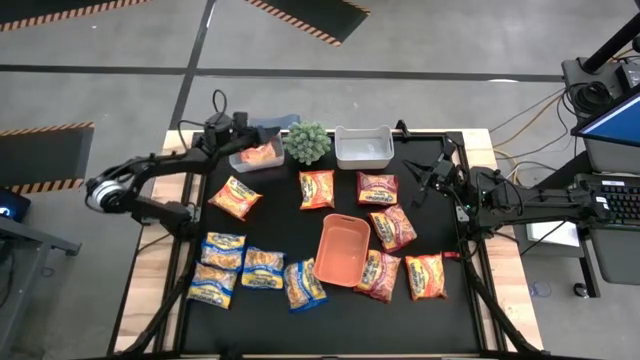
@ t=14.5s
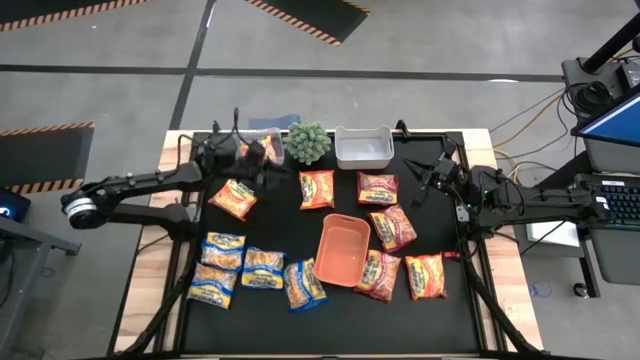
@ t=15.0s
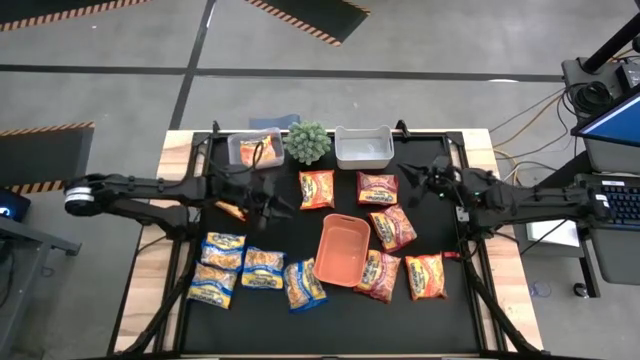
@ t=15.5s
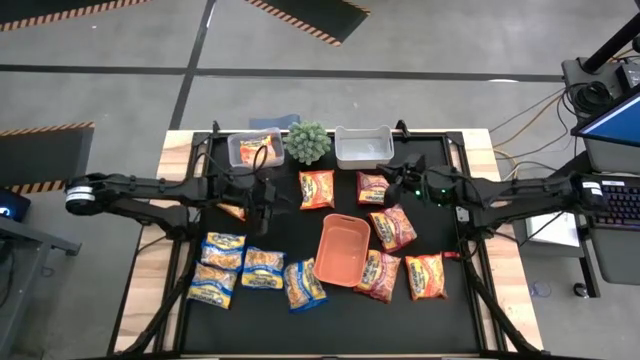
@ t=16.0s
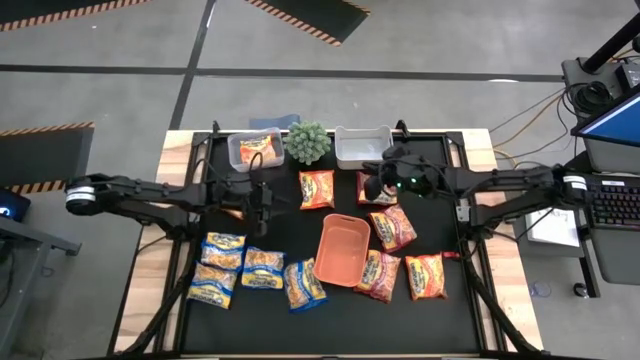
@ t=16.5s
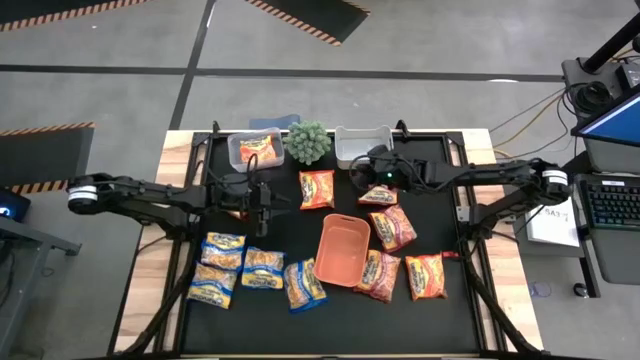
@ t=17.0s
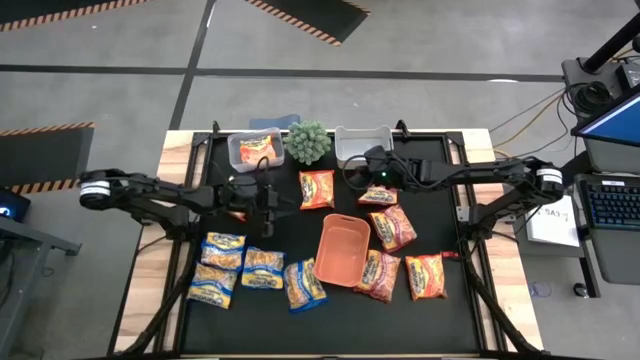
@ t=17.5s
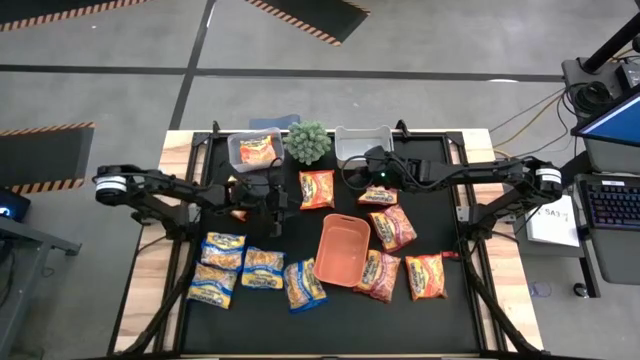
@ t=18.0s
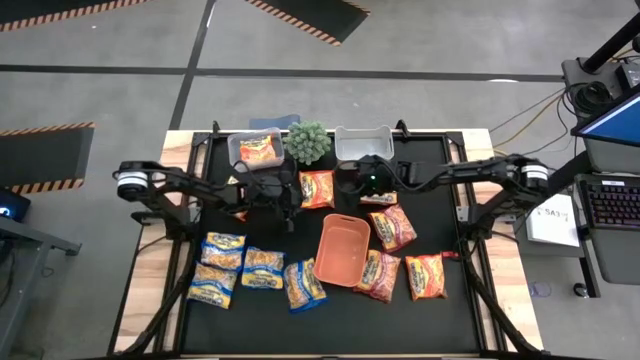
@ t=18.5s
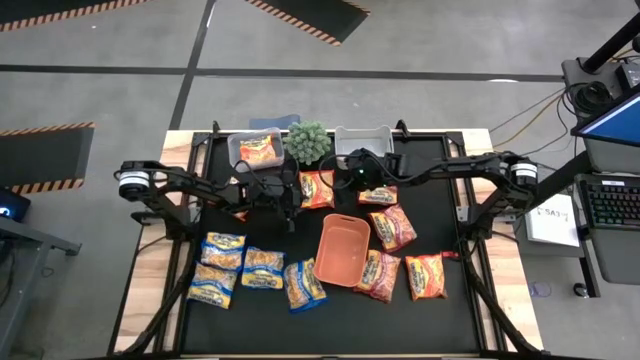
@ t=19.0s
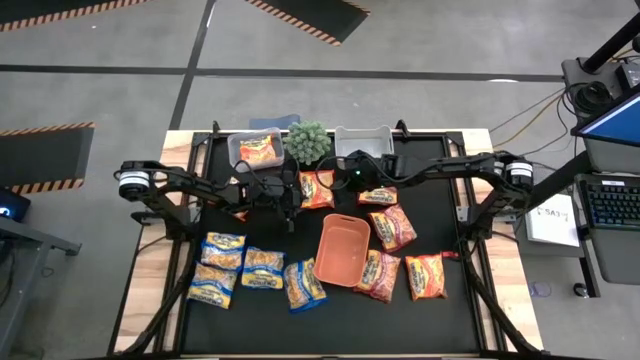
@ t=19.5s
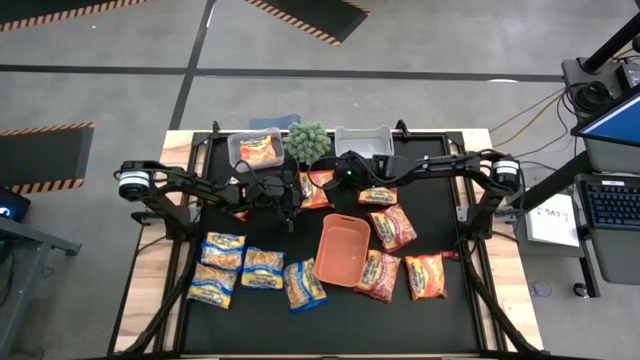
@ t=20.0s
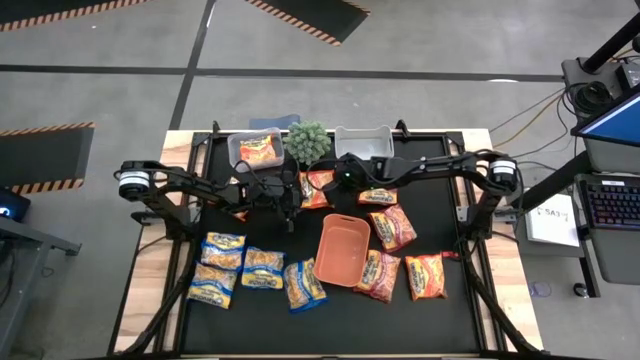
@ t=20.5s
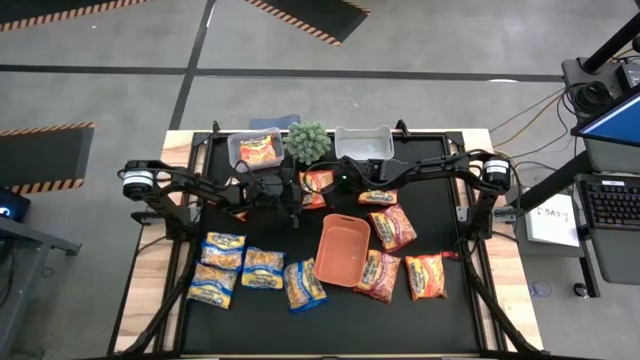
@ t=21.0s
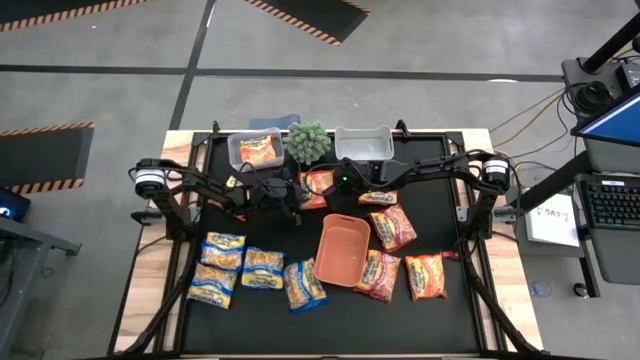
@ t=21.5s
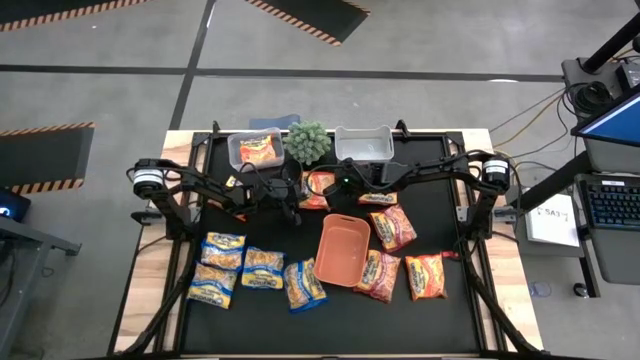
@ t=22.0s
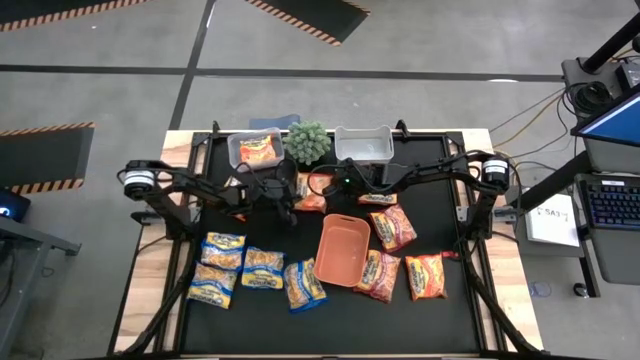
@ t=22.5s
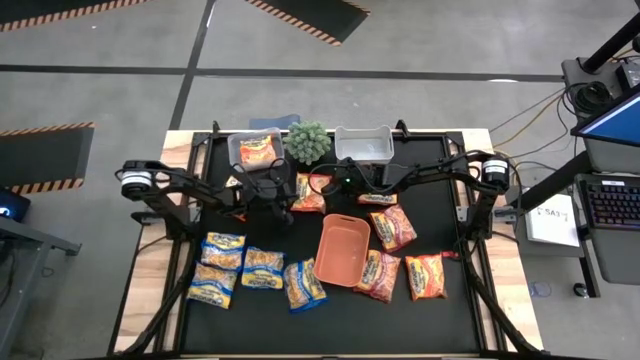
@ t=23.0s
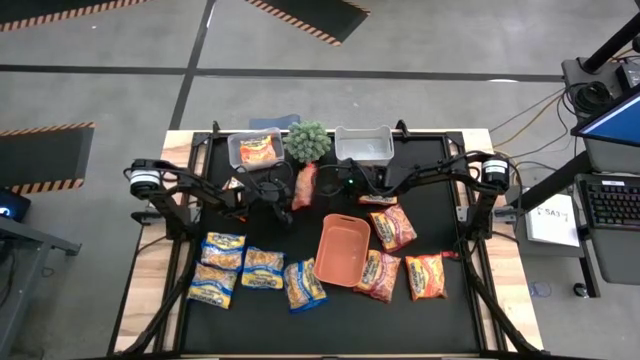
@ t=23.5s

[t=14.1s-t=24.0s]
Task: Sort Maruchan noodles
Put the orange noodle pack into the transparent bin

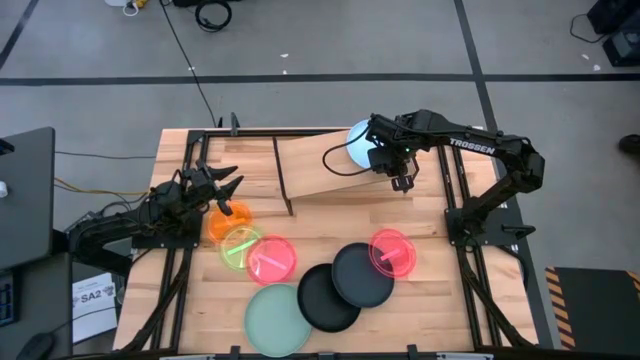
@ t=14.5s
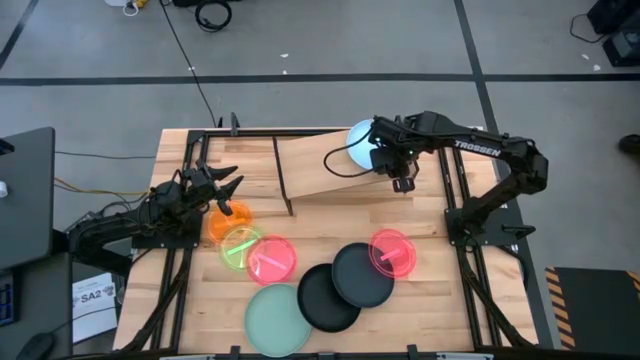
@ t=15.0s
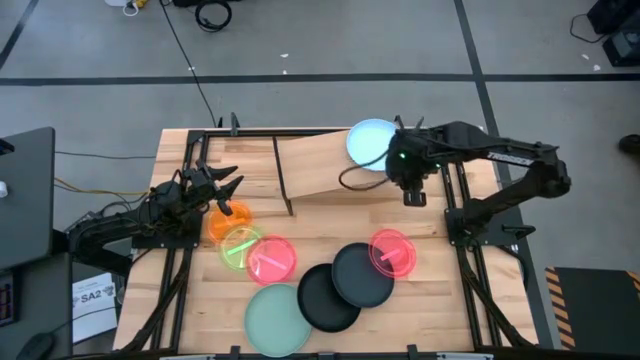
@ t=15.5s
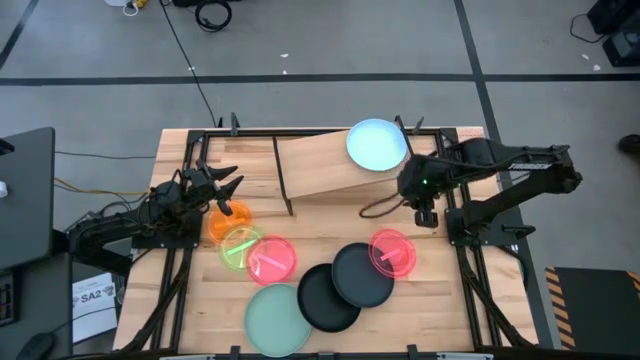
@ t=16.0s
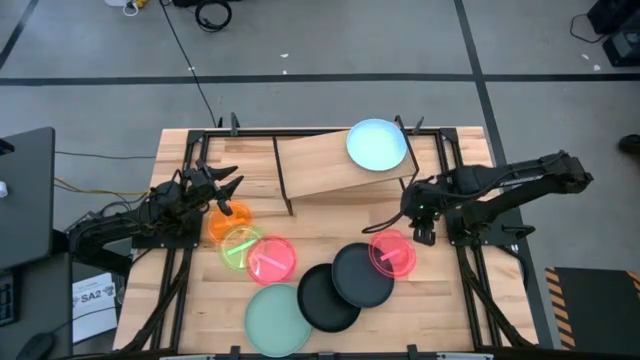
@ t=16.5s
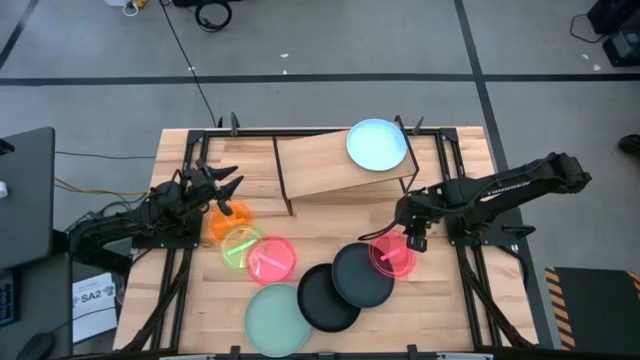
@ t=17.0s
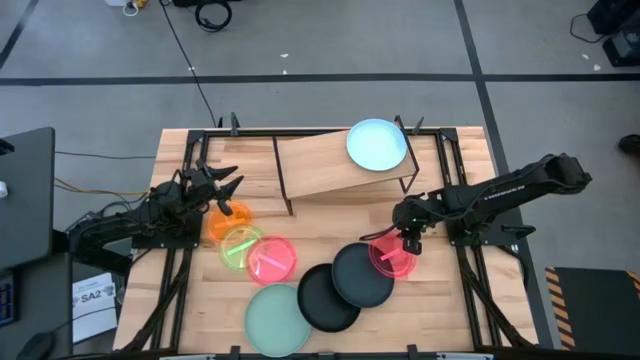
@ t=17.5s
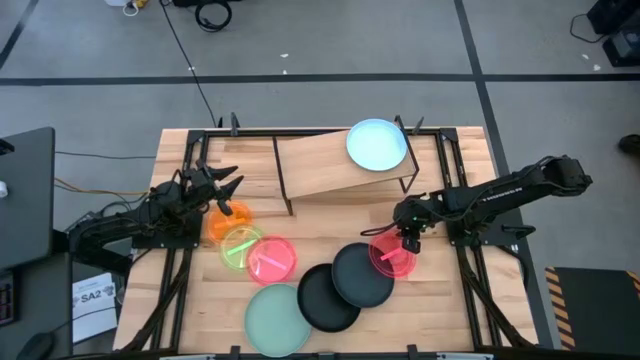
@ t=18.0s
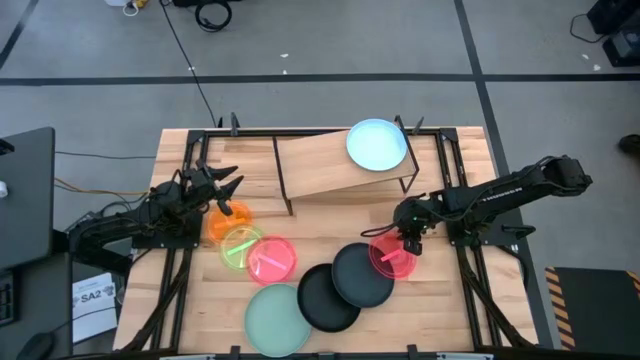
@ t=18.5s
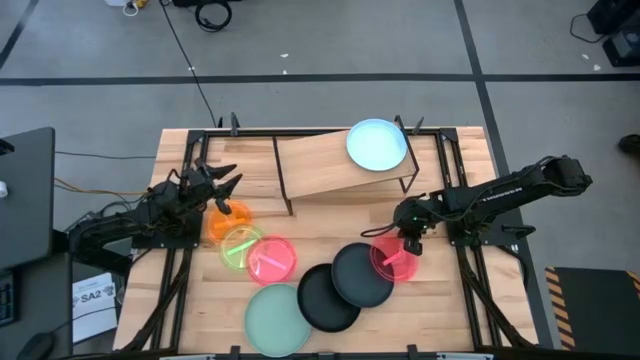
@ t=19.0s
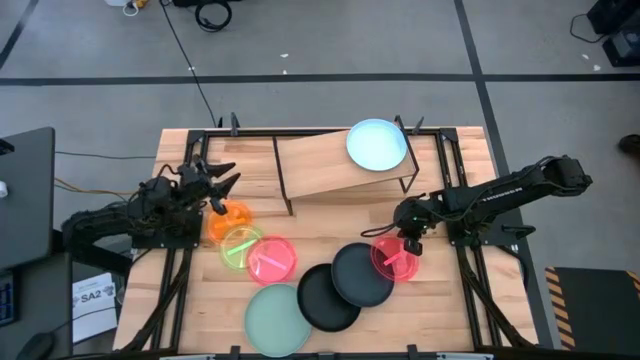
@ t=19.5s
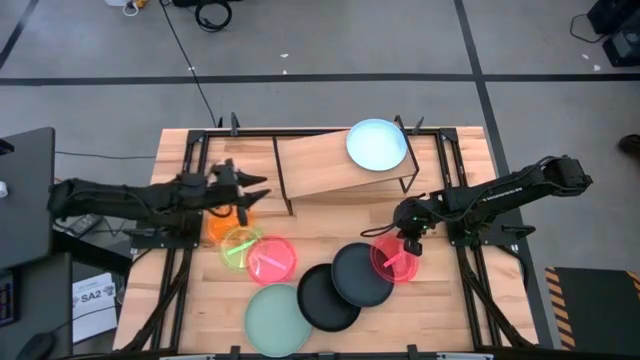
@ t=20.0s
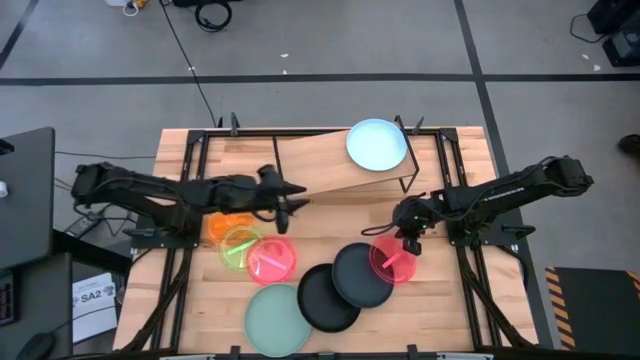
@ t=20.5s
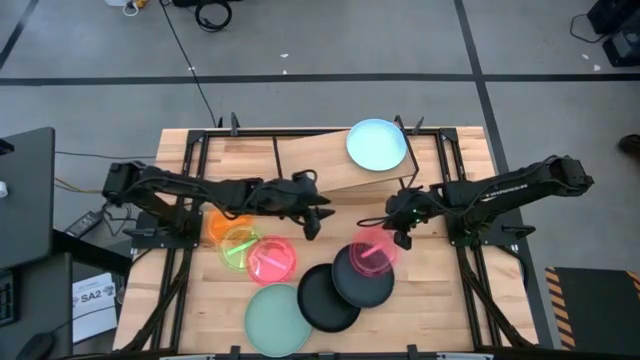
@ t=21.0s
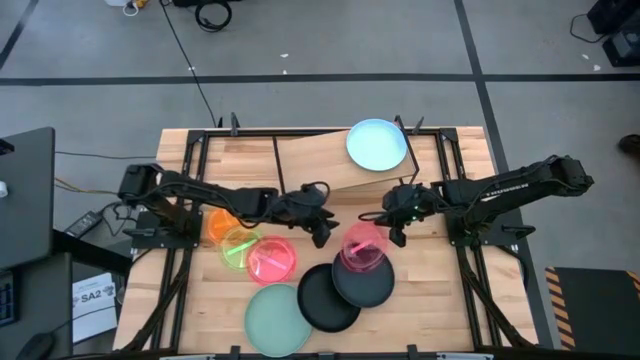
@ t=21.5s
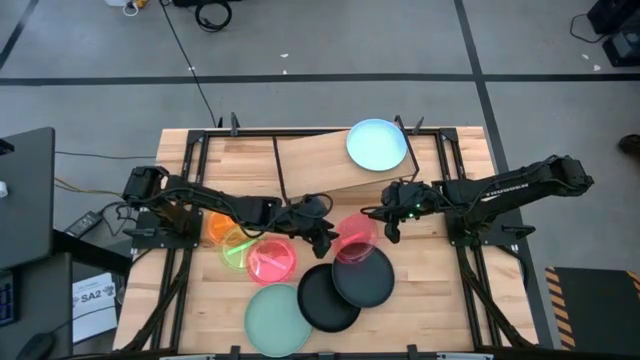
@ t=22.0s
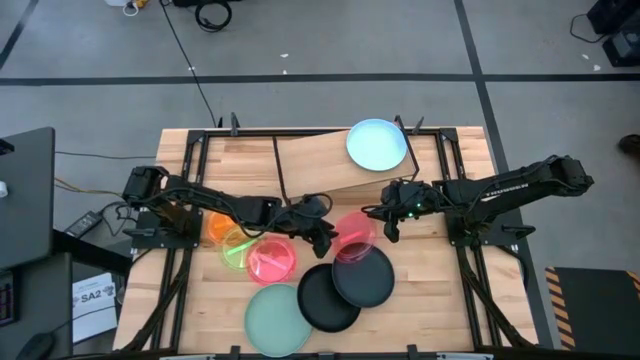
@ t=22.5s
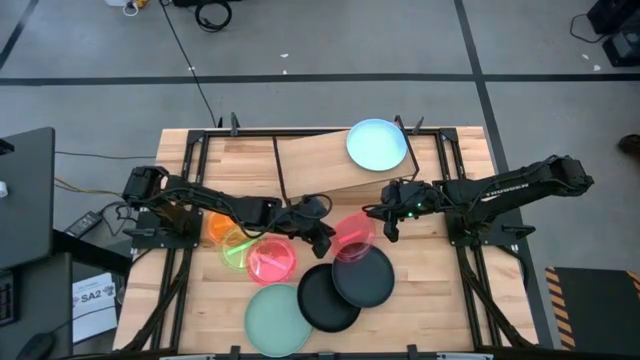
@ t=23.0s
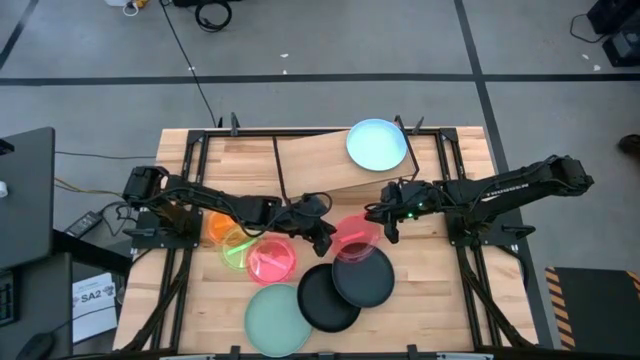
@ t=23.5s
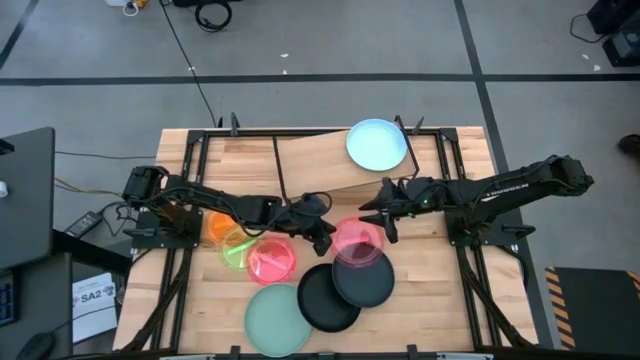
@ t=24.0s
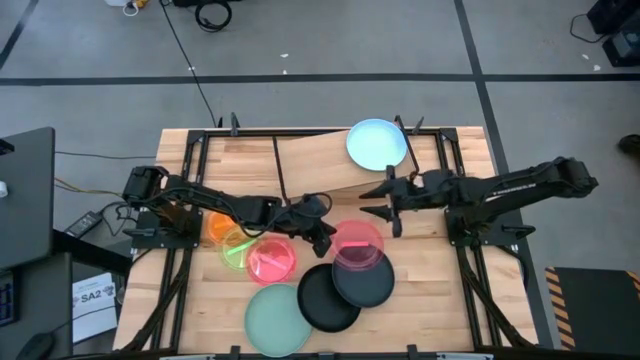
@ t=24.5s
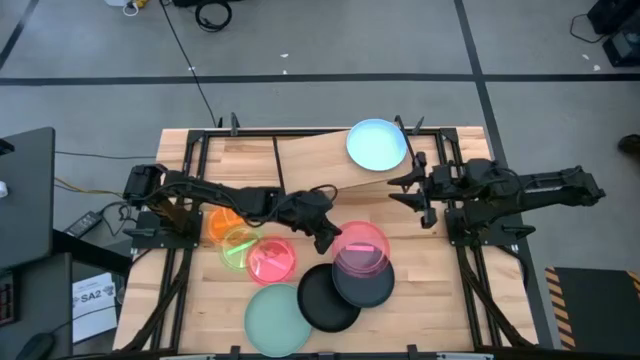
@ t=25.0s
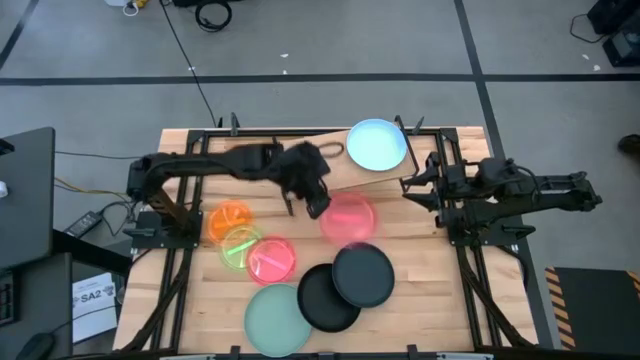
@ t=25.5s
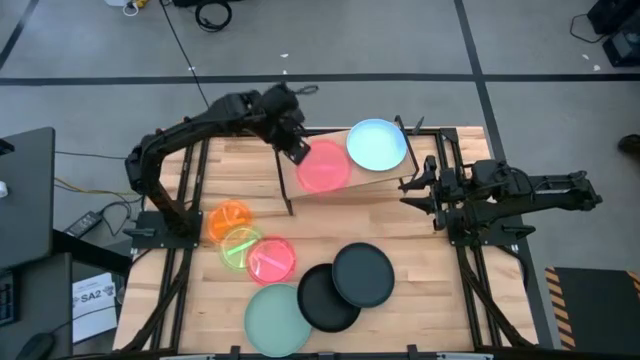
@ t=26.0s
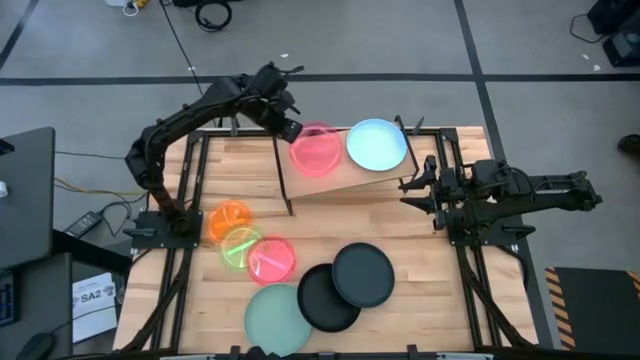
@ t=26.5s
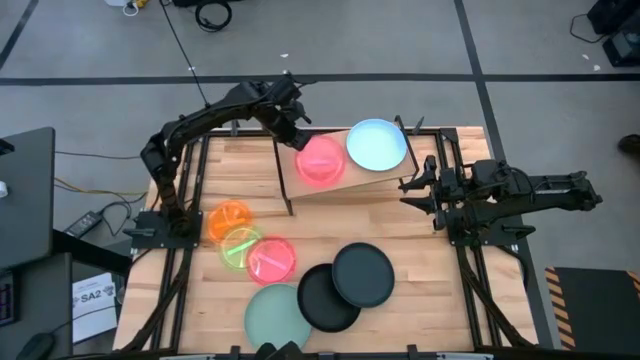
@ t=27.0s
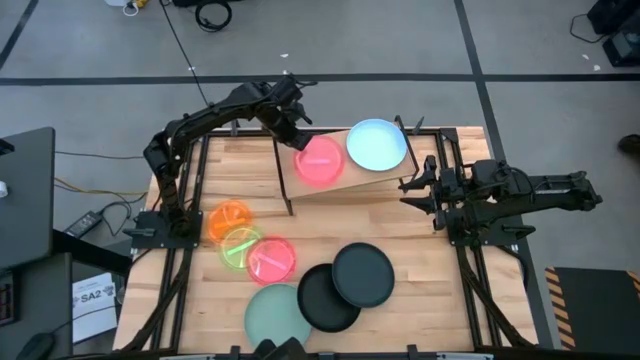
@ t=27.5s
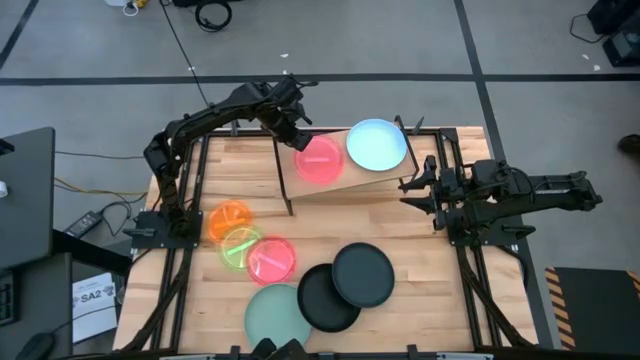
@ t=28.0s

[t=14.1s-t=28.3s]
Task: Place and stack plates onto a shelf
Put the small right pink plate on the shelf
